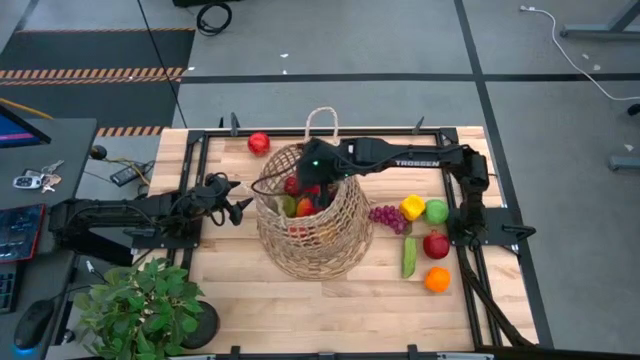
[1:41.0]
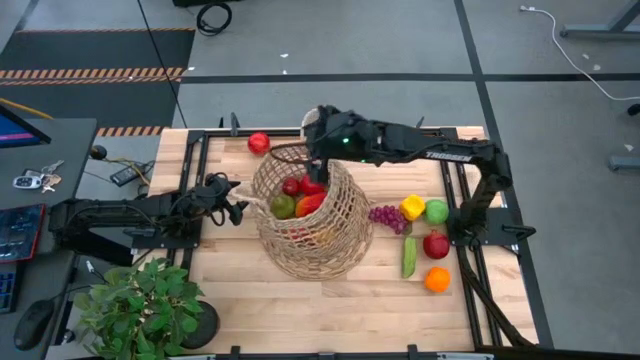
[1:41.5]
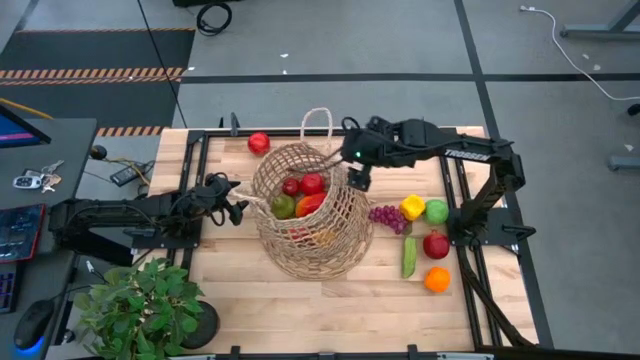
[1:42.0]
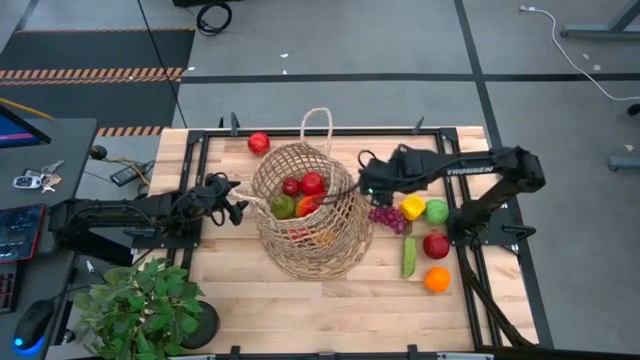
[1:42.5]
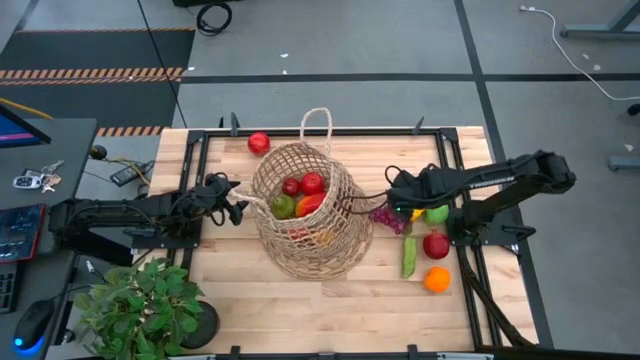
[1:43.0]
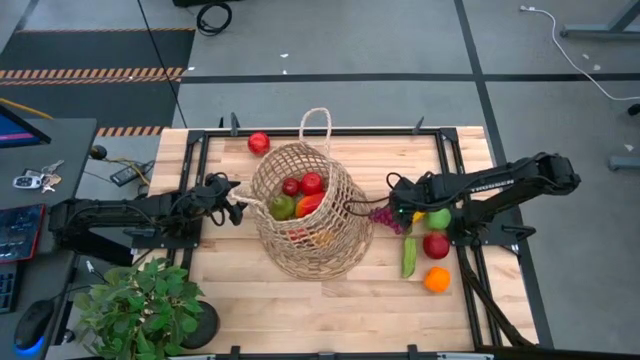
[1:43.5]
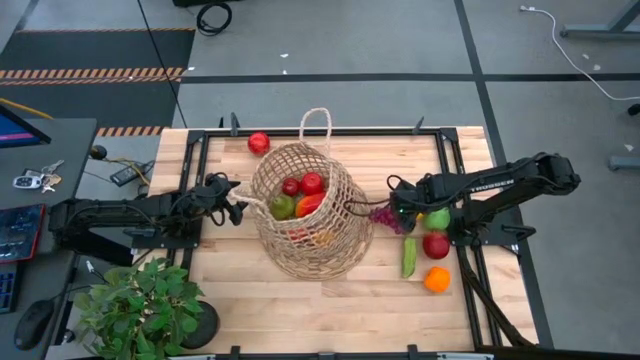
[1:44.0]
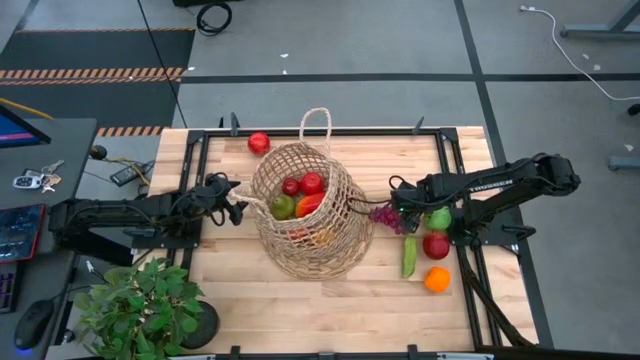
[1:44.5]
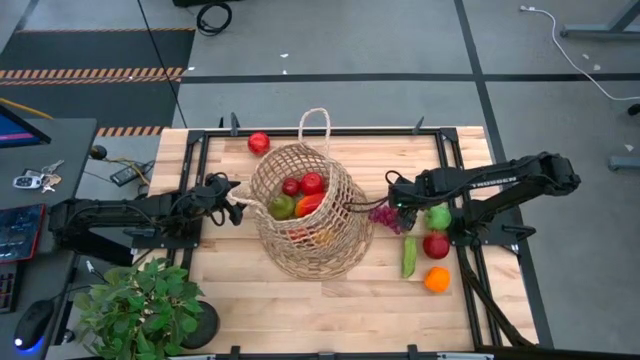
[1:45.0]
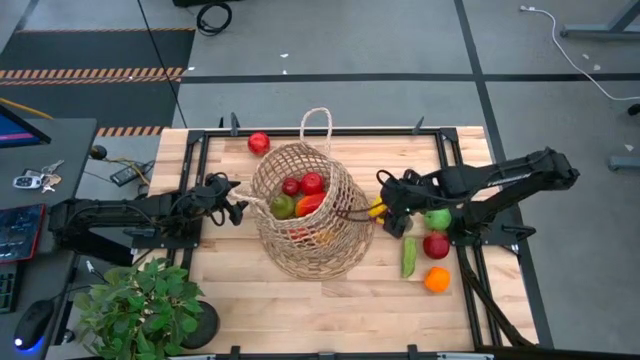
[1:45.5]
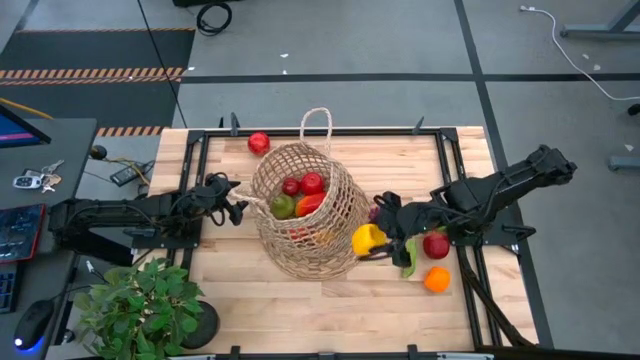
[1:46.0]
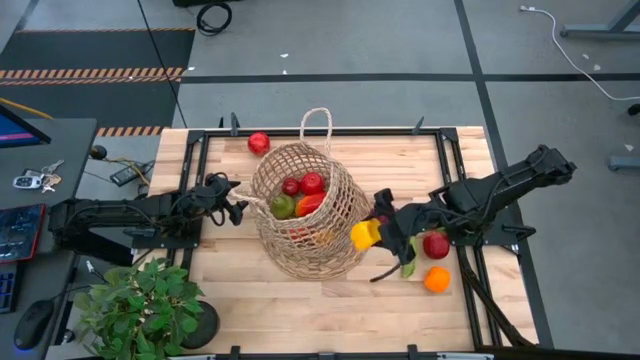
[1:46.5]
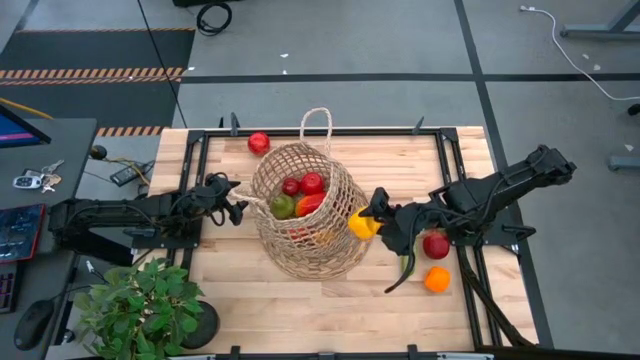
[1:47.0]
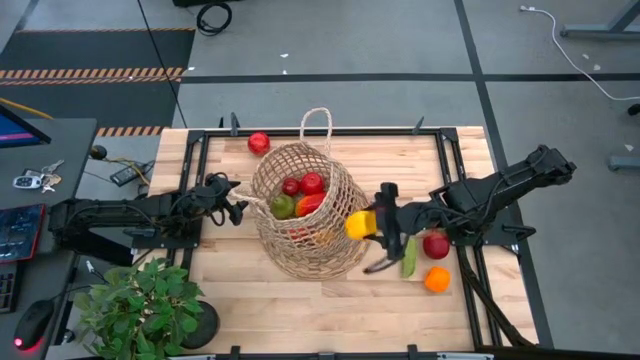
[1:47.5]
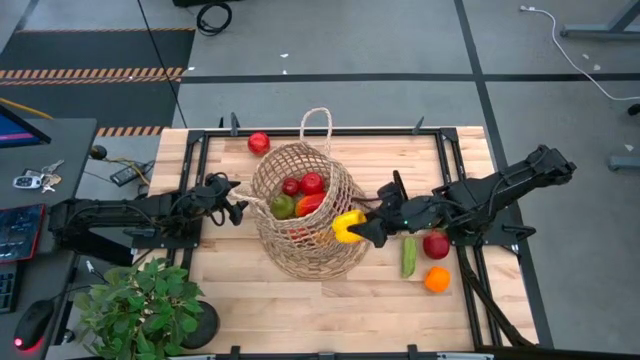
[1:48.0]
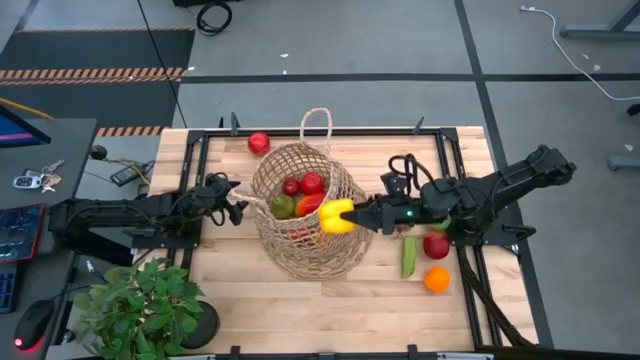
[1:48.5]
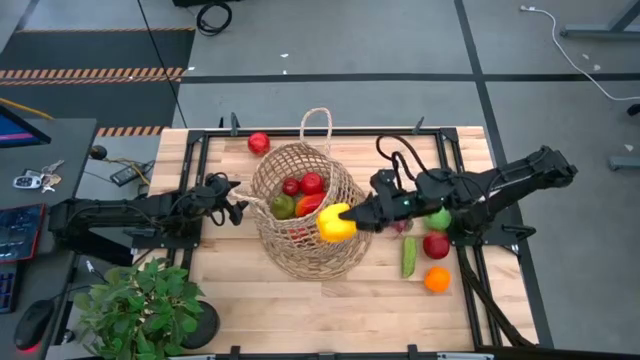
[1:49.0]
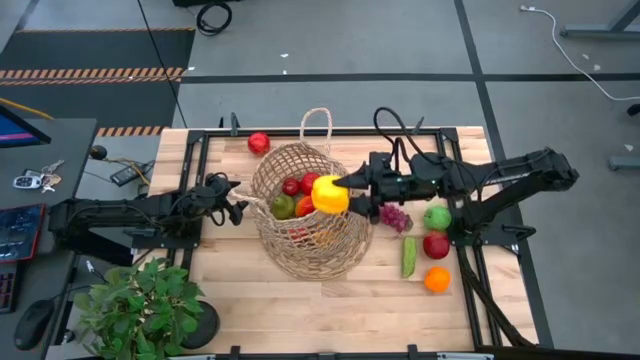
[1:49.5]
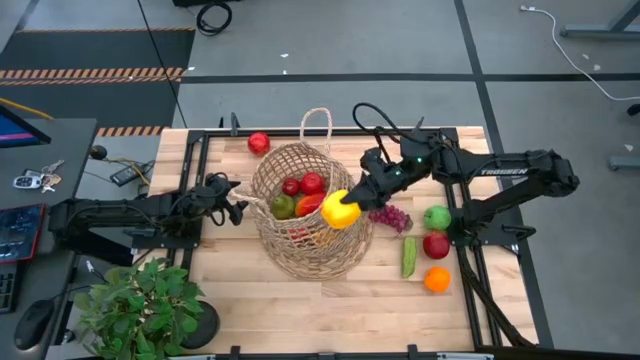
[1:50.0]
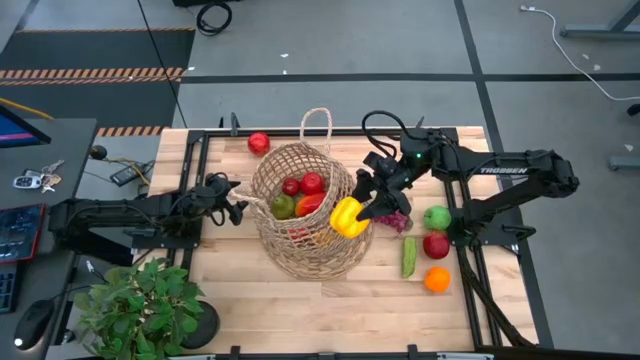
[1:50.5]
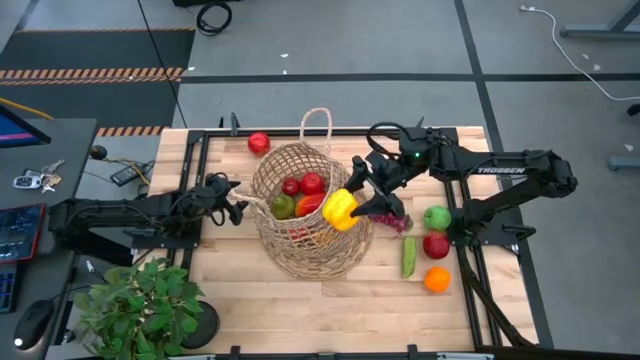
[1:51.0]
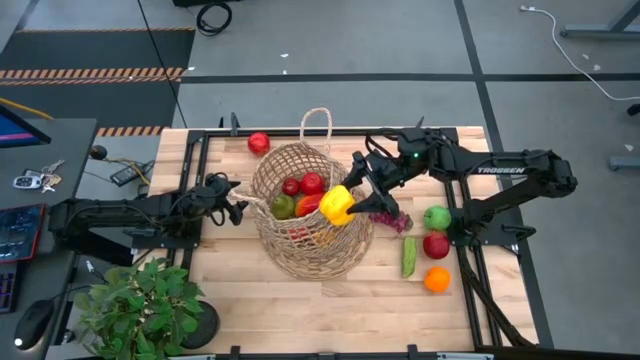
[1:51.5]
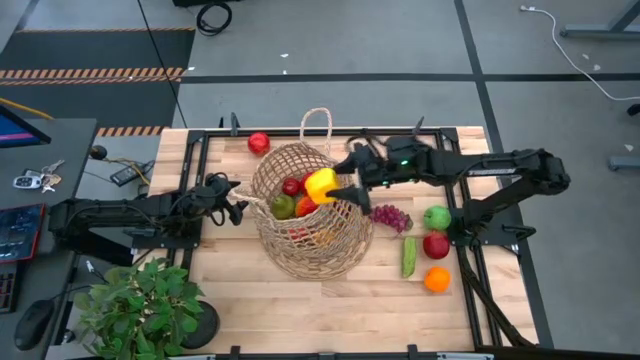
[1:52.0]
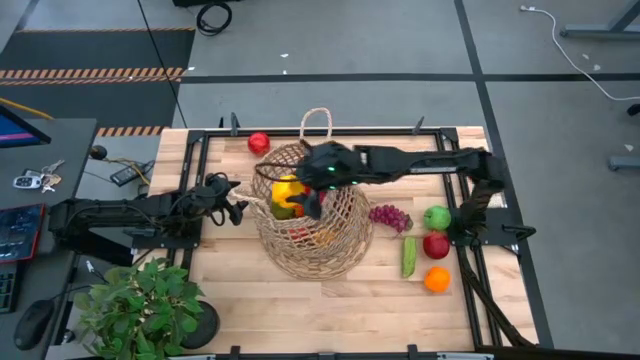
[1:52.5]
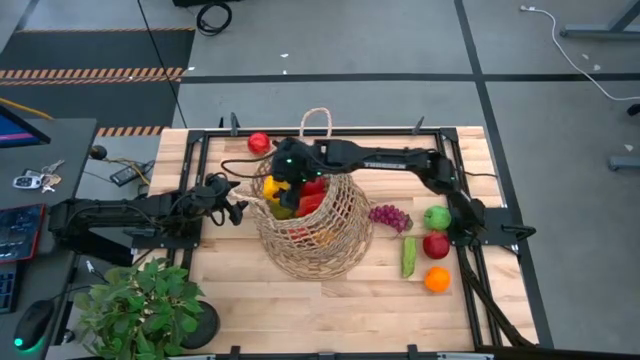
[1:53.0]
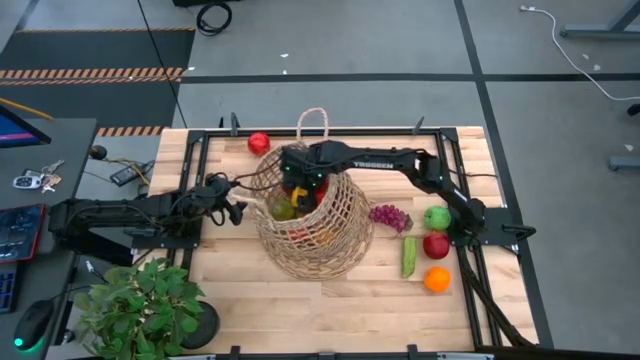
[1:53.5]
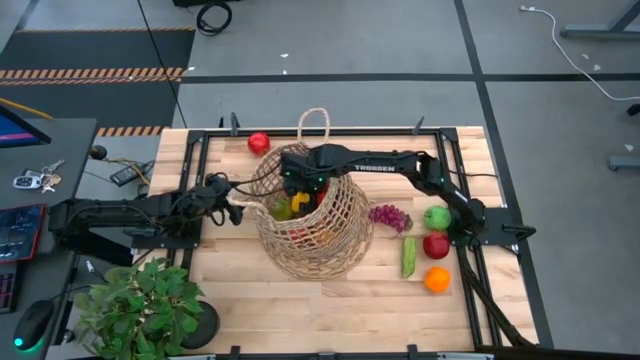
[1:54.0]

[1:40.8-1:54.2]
Task: Build produce basket
Put the yellow bell pepper into the basket

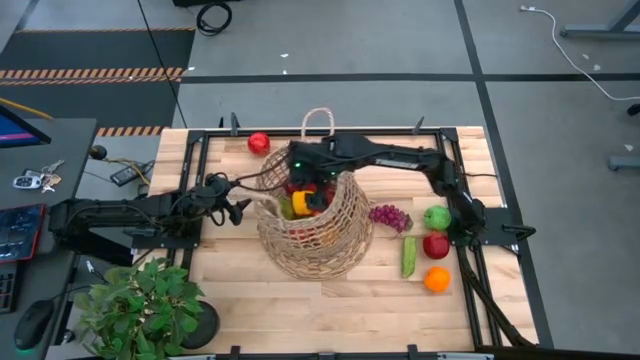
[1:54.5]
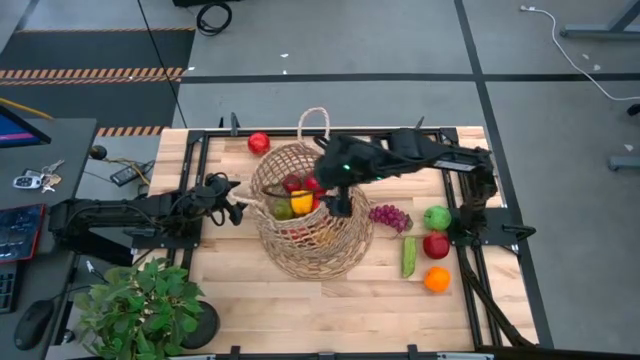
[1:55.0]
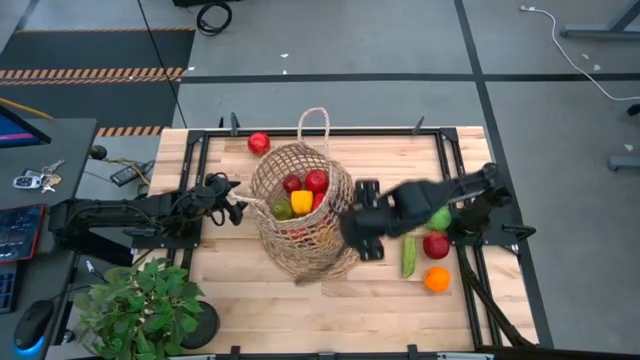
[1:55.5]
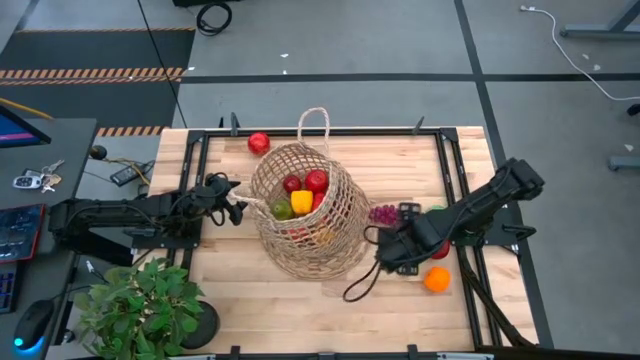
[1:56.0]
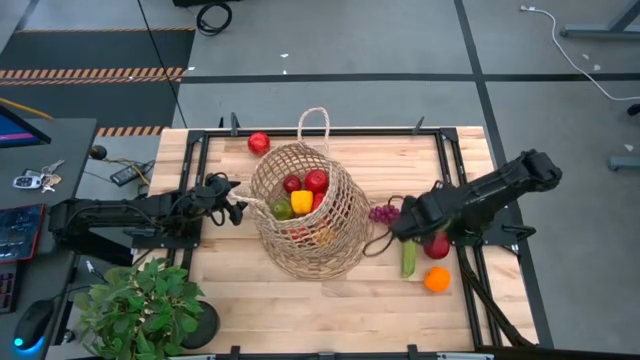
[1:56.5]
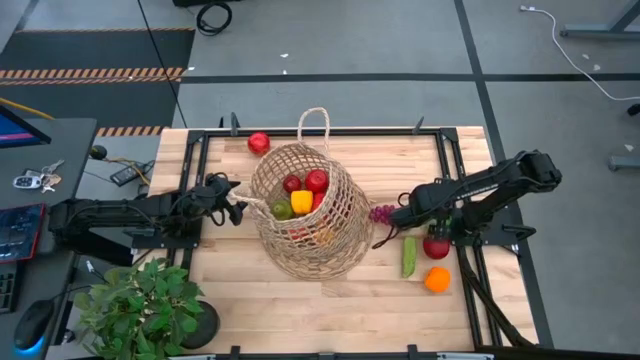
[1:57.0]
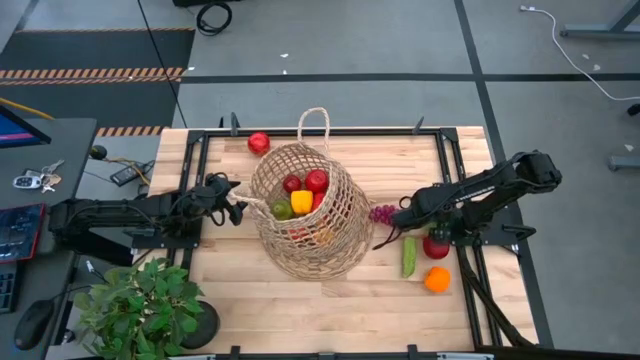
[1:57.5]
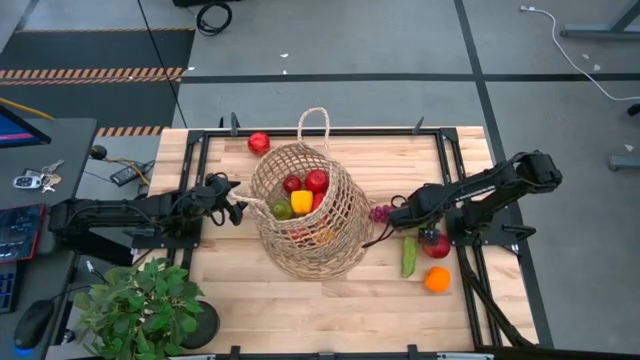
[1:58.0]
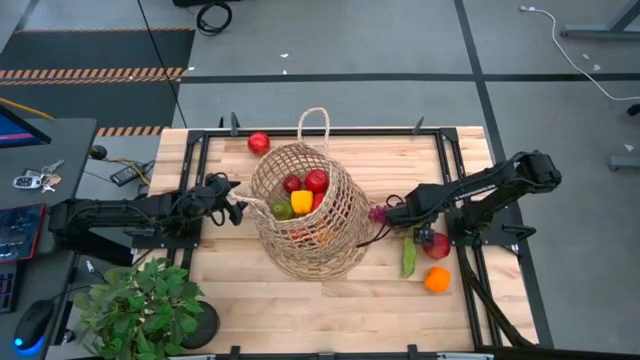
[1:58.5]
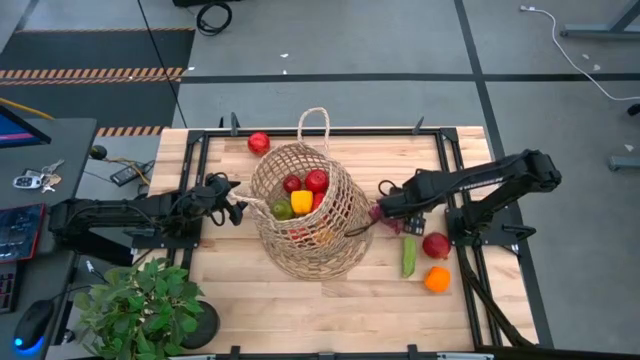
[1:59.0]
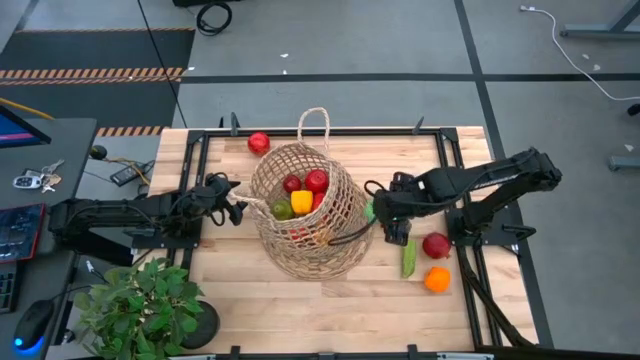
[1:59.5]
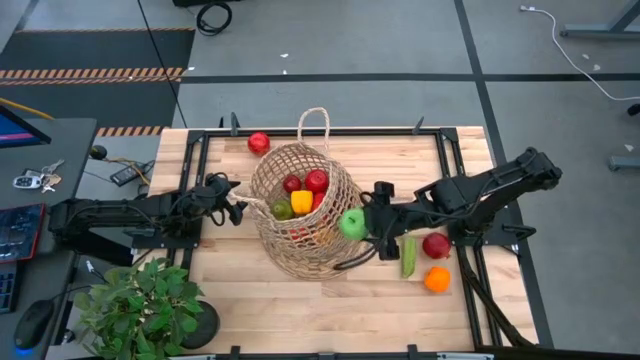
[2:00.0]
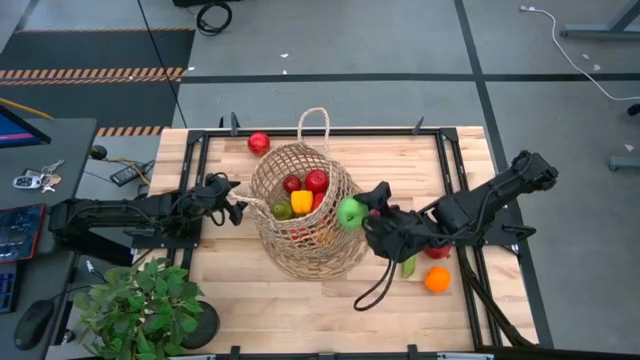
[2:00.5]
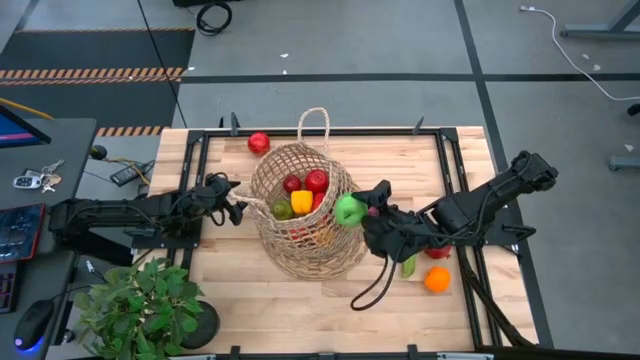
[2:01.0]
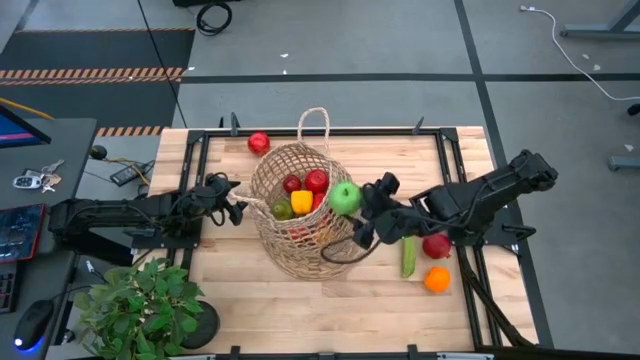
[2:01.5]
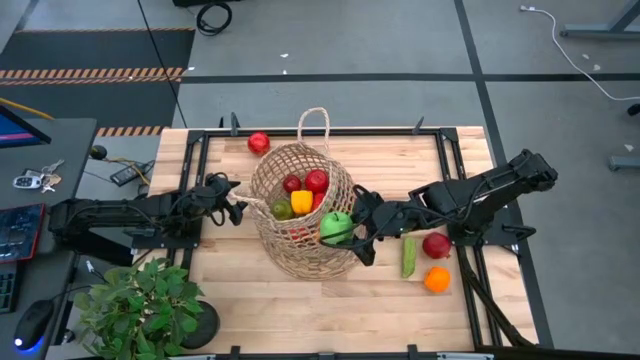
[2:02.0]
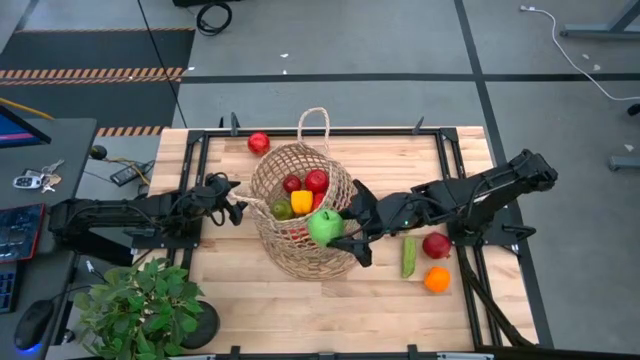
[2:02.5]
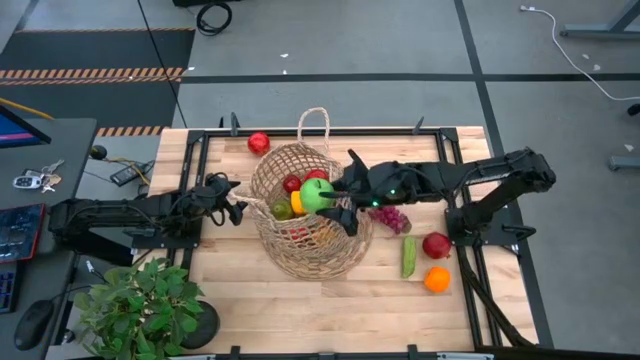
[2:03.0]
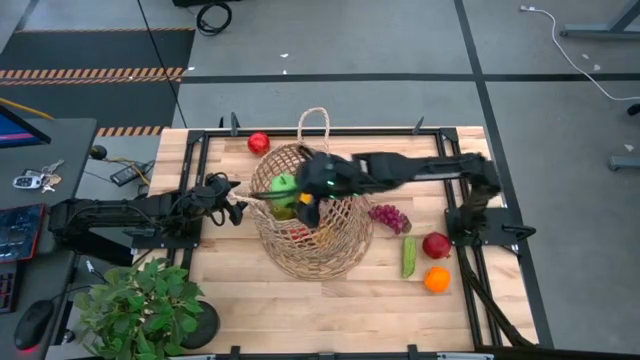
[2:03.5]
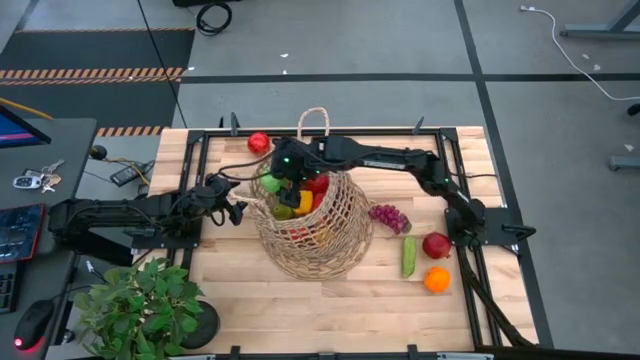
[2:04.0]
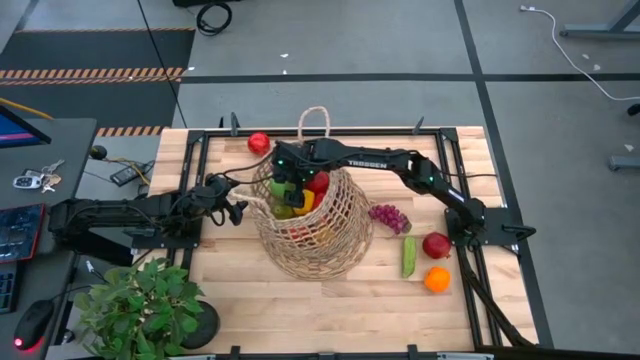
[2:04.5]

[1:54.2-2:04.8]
Put the green apple into the basket
